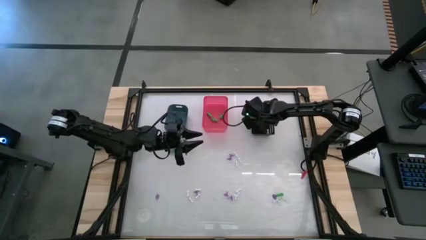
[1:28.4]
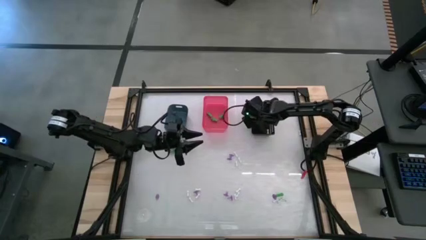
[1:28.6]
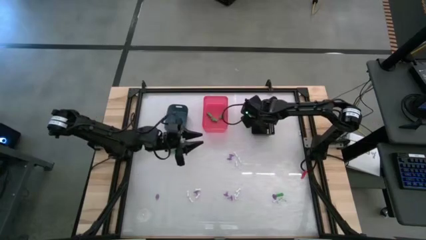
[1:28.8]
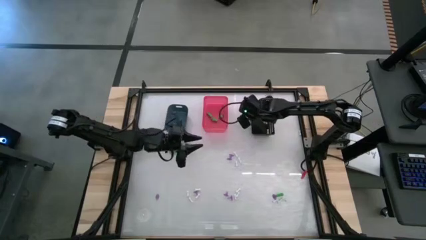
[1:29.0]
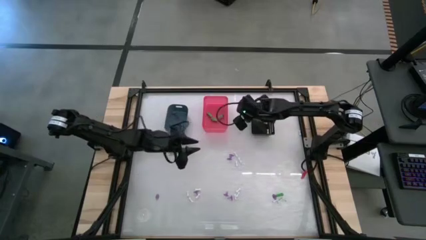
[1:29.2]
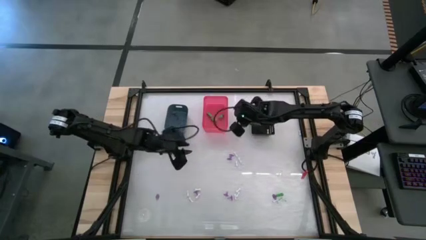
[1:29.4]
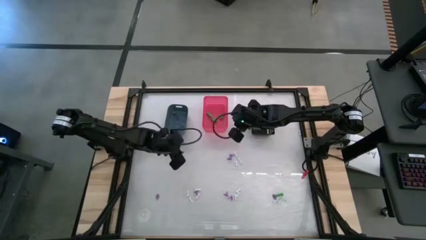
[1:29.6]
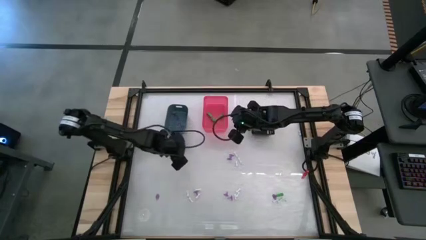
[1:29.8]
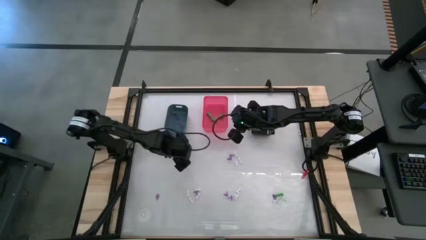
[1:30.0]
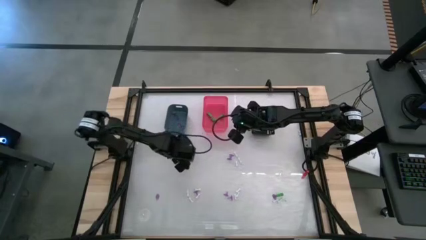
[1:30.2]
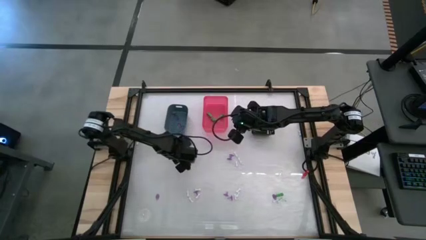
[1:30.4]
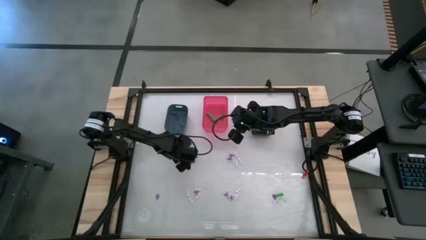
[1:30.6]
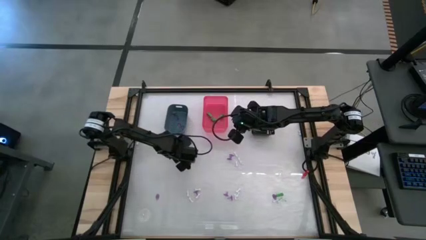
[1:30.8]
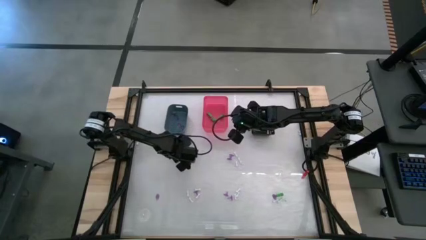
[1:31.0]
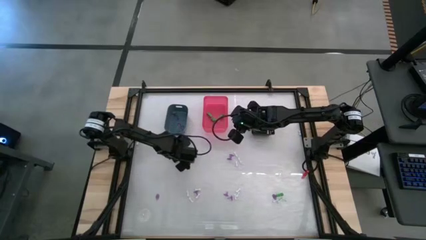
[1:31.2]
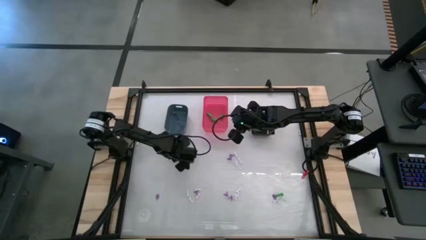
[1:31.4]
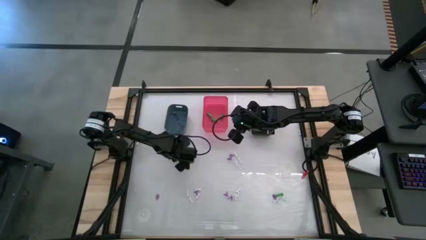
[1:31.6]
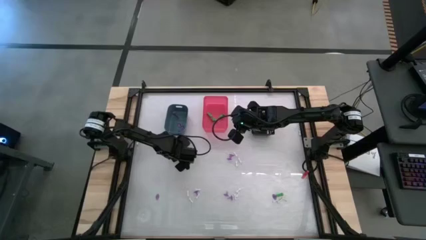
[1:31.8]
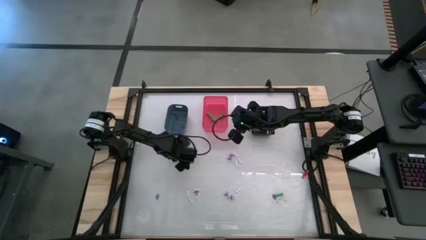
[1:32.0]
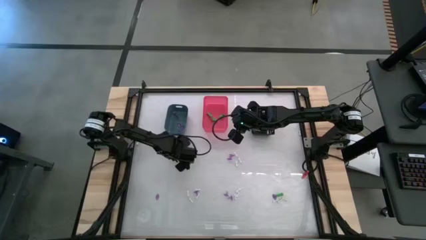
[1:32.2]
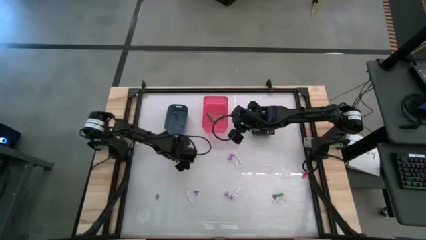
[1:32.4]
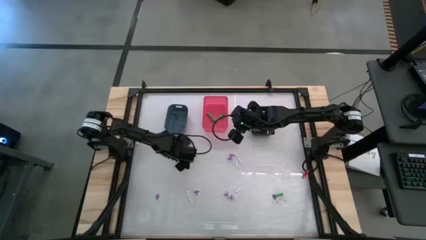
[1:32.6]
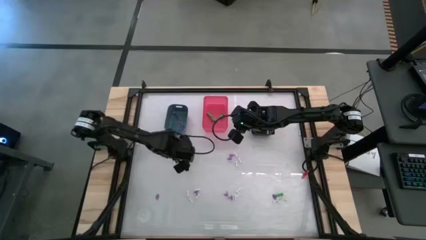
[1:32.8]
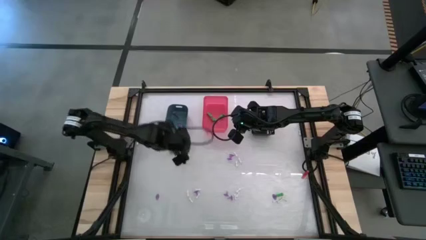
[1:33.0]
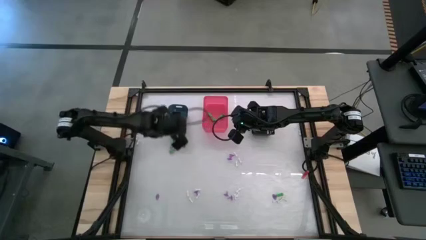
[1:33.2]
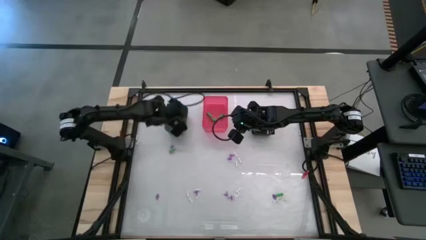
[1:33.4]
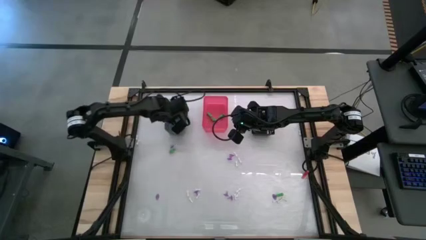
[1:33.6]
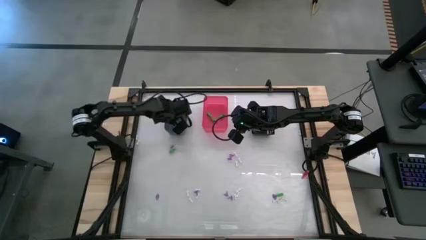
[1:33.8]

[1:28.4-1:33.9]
Task: Sort Halloween decoration
Put the purple witch hat toy into the blue bin

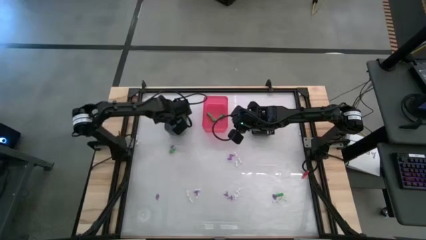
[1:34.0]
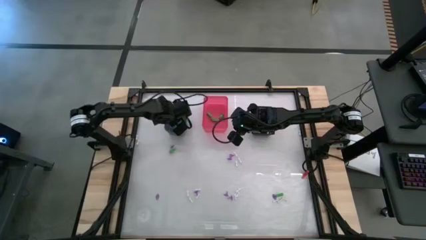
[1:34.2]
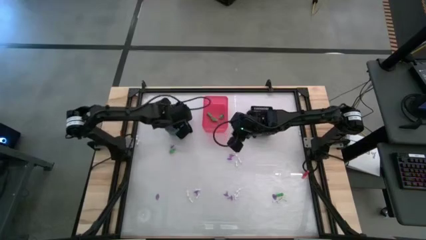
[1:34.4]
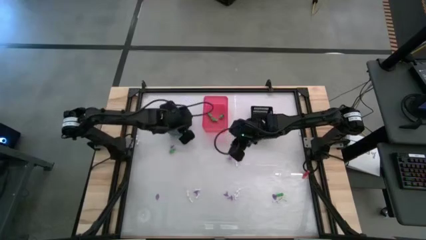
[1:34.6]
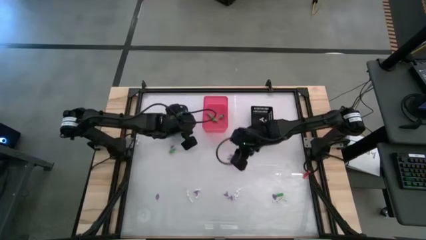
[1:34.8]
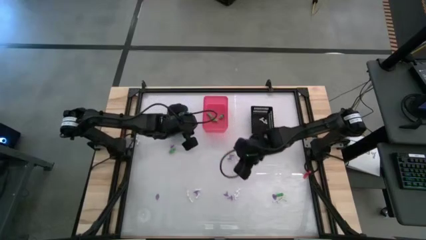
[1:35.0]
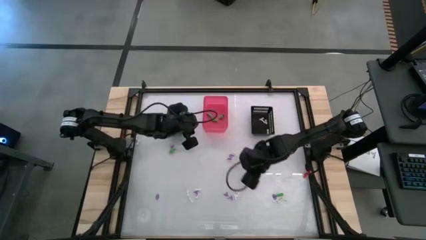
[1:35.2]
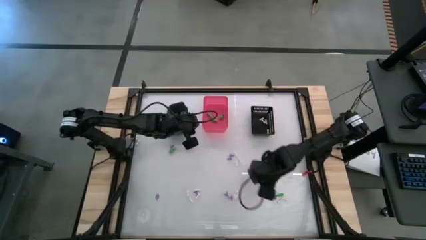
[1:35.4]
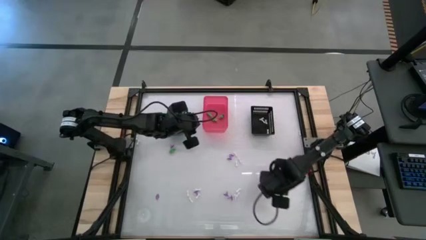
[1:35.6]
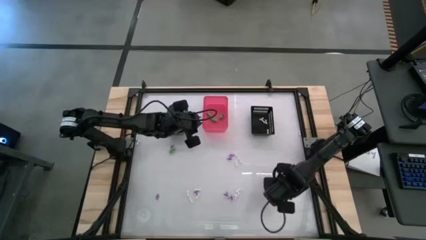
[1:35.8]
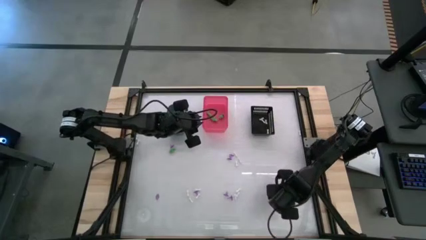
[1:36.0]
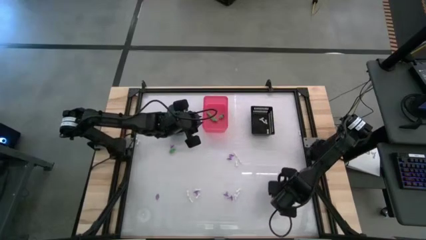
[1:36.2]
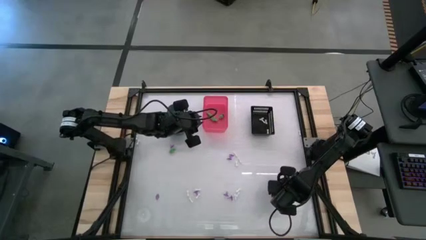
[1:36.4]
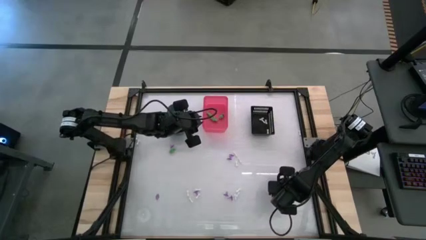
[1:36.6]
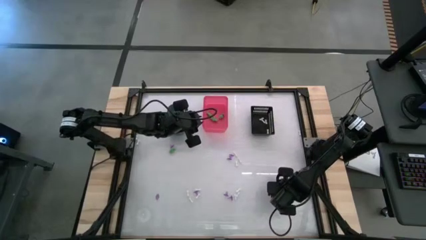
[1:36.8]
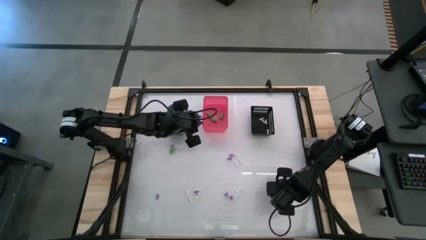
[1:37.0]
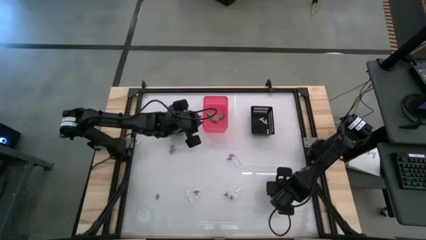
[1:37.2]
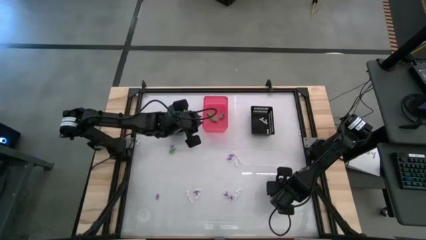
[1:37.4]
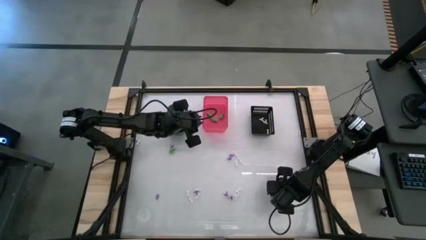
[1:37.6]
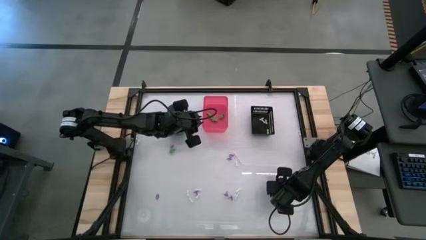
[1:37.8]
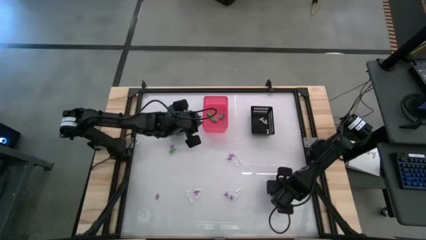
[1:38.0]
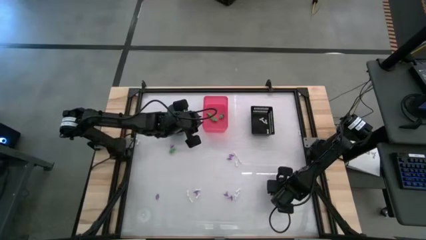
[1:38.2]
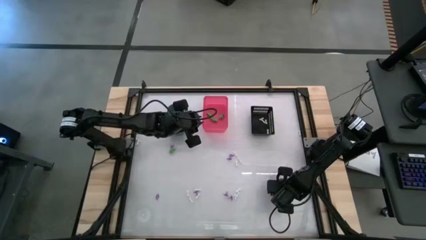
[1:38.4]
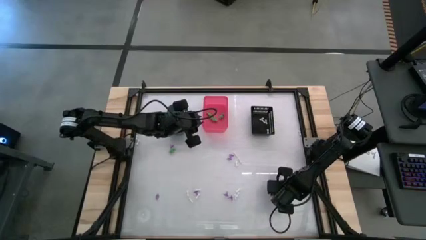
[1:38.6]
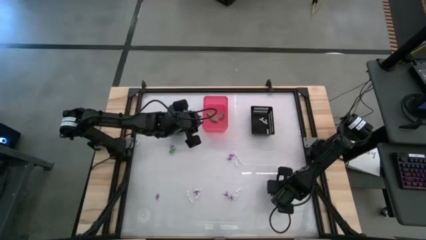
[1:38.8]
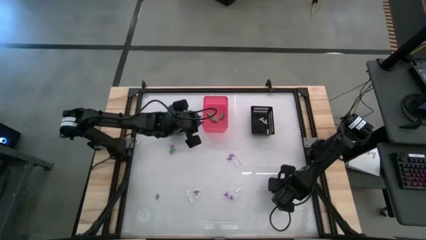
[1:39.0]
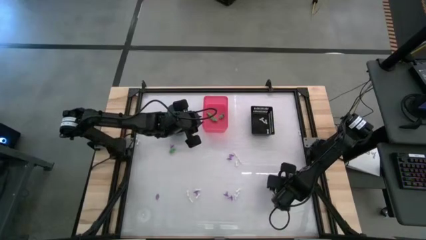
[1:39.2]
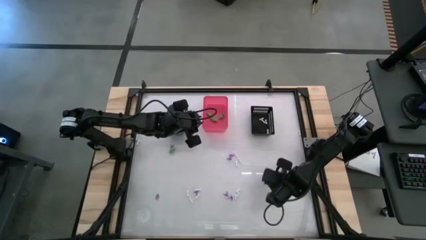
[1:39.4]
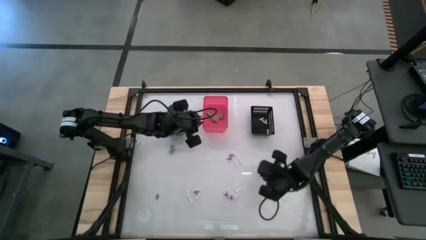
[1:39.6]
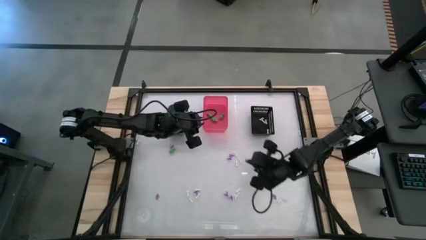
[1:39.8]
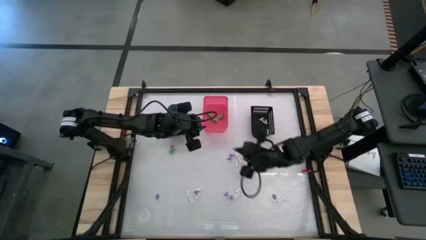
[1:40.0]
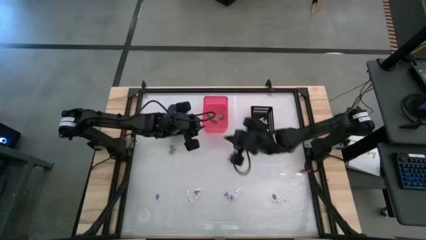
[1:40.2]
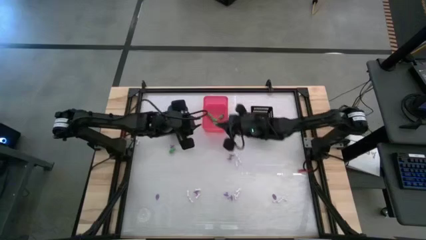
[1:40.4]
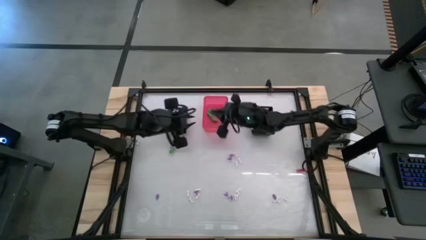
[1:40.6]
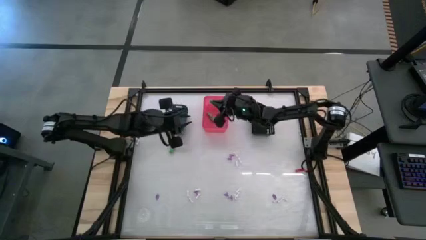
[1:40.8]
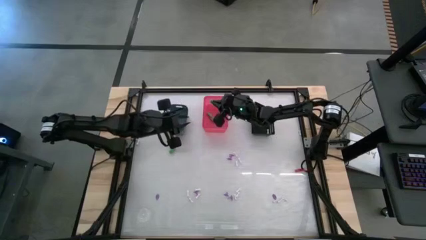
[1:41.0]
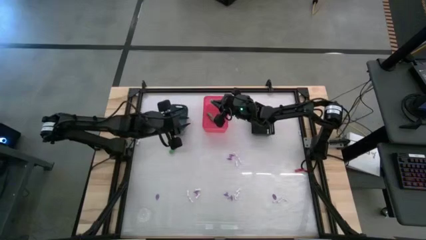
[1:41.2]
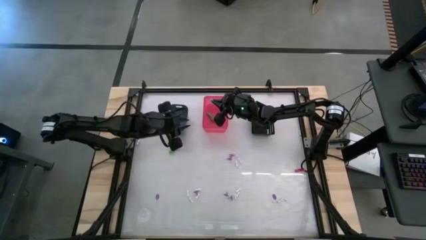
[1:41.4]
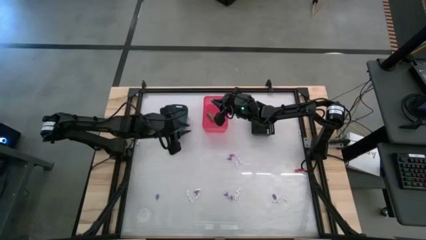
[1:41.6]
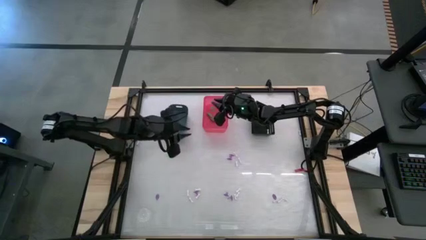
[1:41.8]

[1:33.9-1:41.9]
Put the green skeleton toy into the pink bin

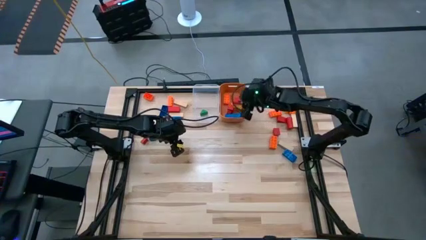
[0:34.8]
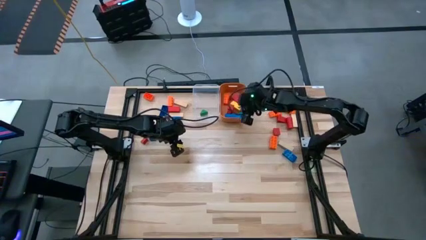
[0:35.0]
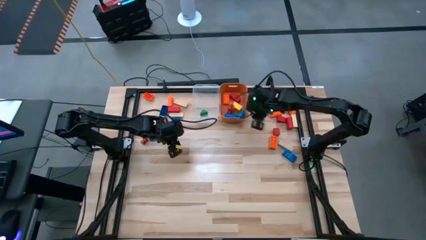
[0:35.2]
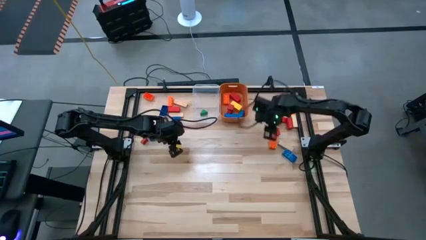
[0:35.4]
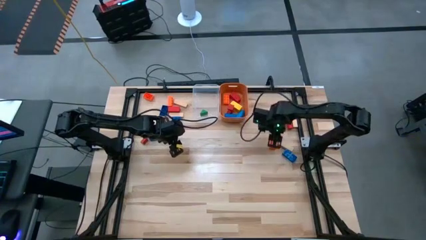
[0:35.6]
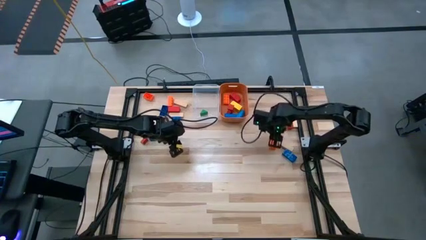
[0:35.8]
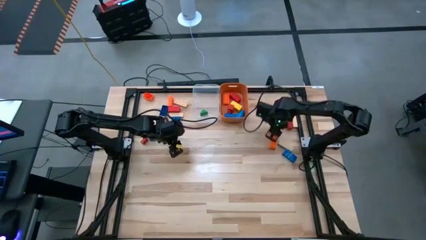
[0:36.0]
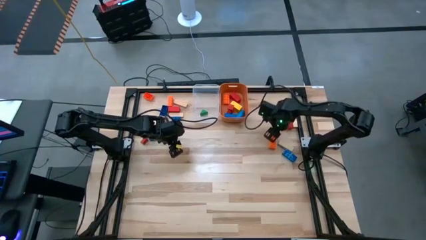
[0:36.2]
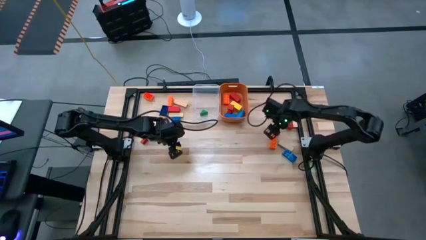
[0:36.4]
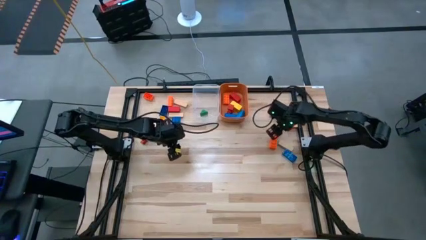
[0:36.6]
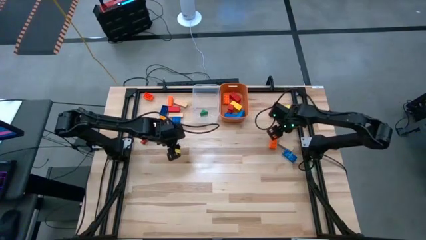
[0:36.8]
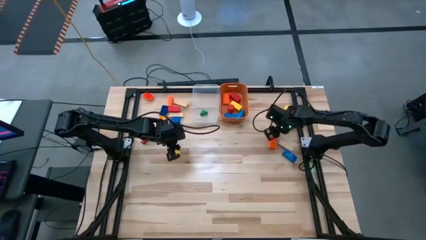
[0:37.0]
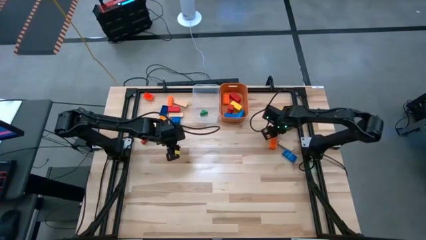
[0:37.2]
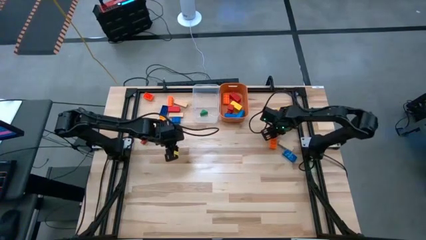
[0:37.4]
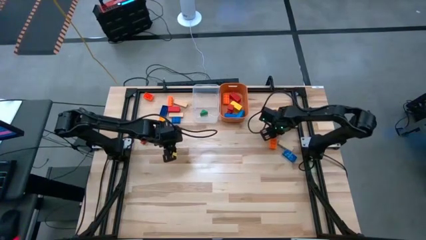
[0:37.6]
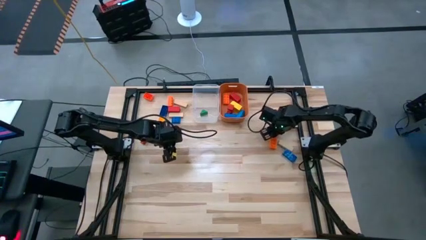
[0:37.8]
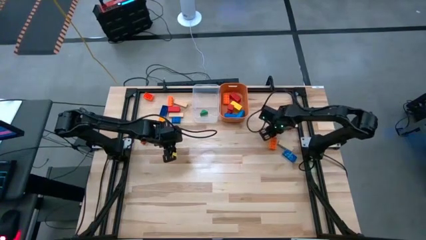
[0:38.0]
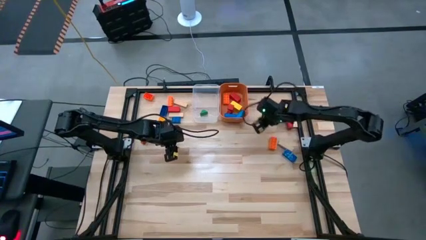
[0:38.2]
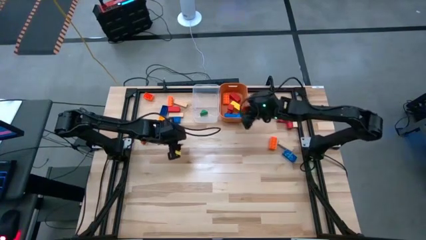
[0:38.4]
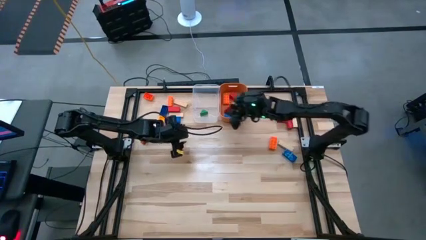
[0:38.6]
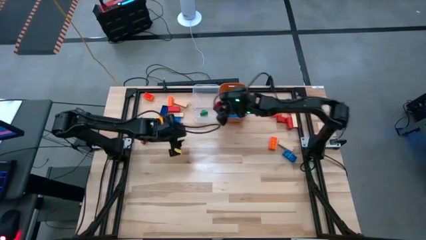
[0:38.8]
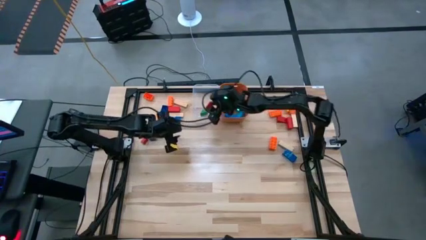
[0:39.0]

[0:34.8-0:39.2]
Task: Sort blocks by size
Put the red half-circle block into the clear bin
